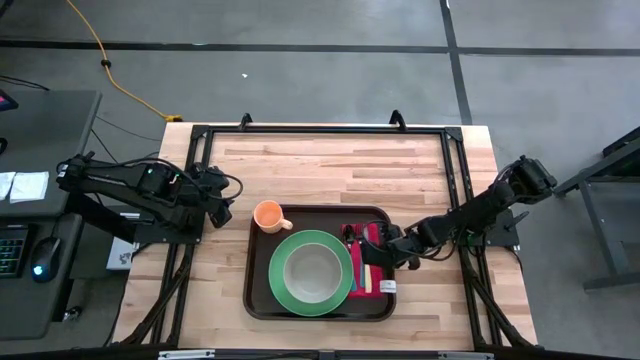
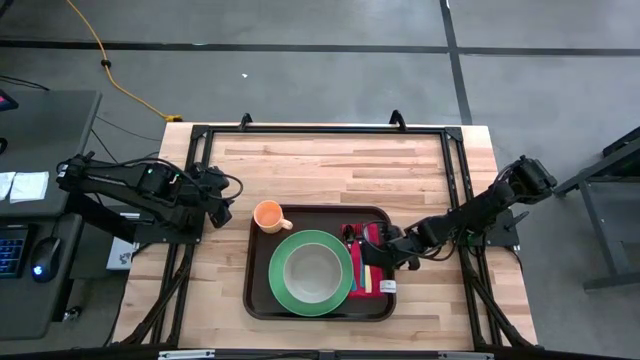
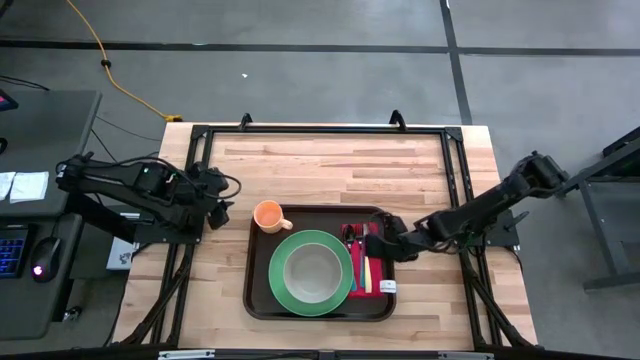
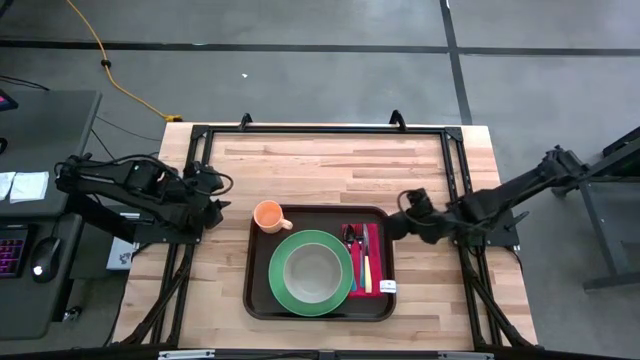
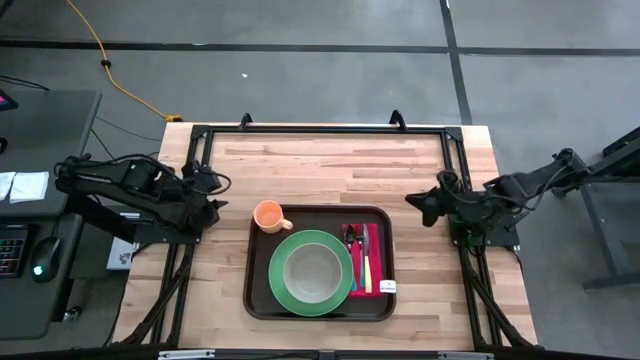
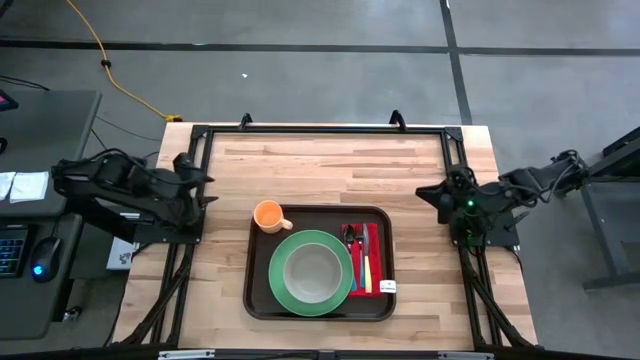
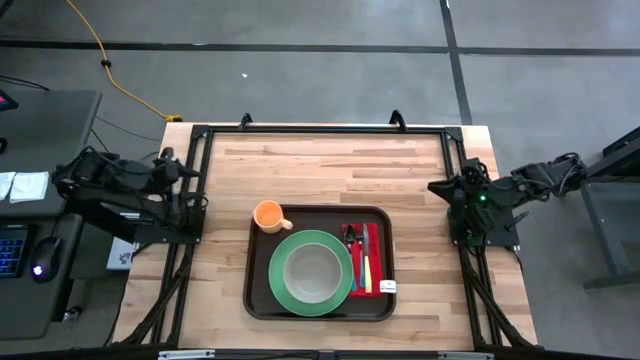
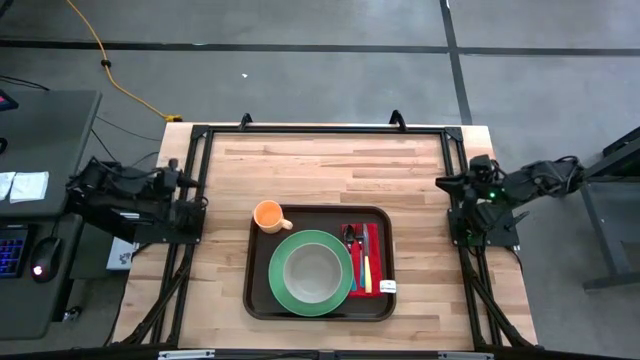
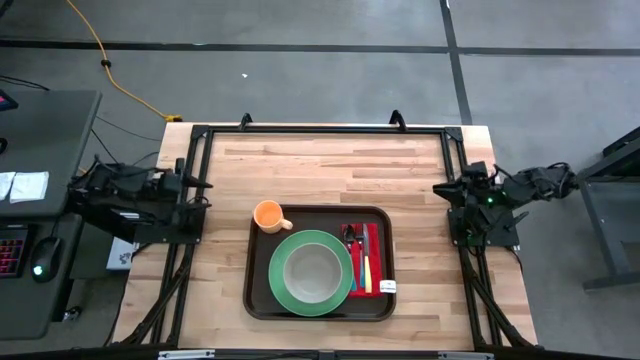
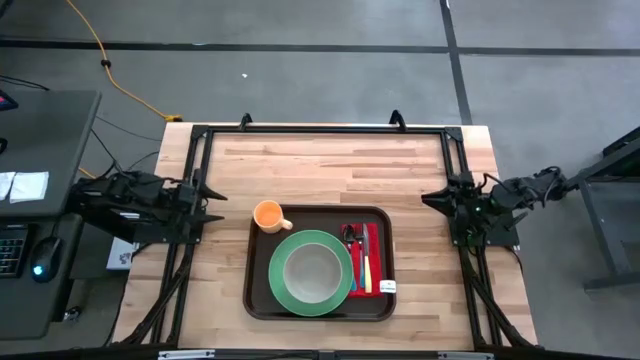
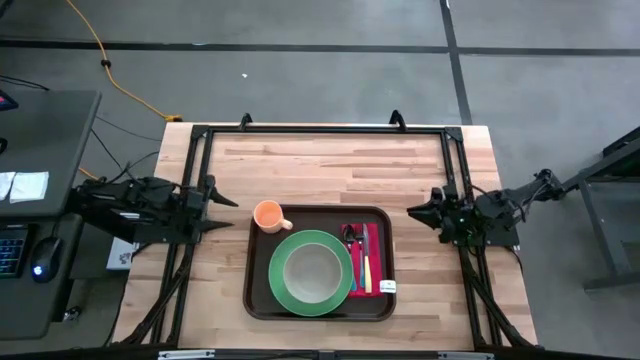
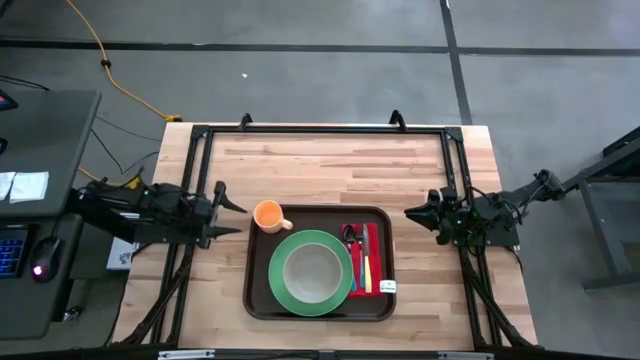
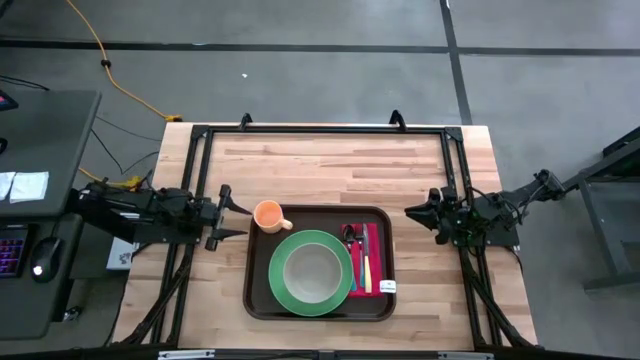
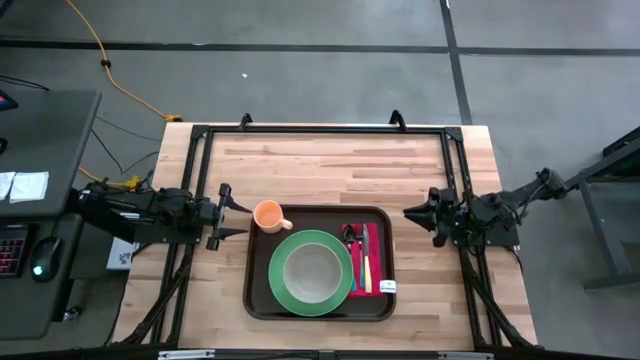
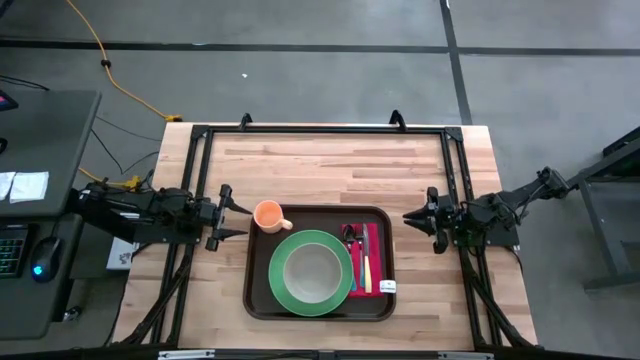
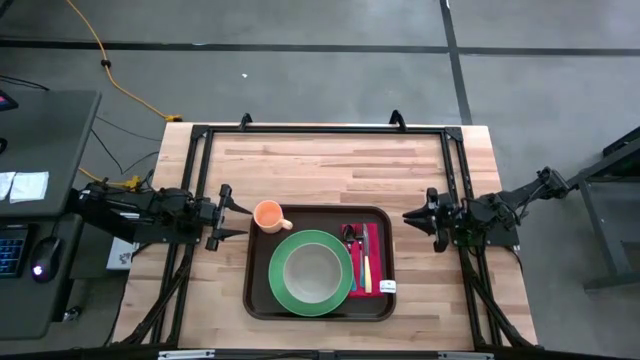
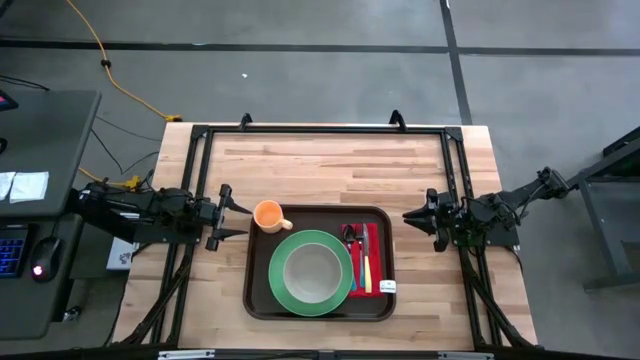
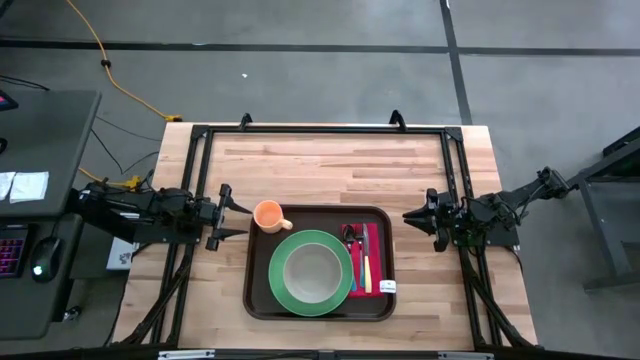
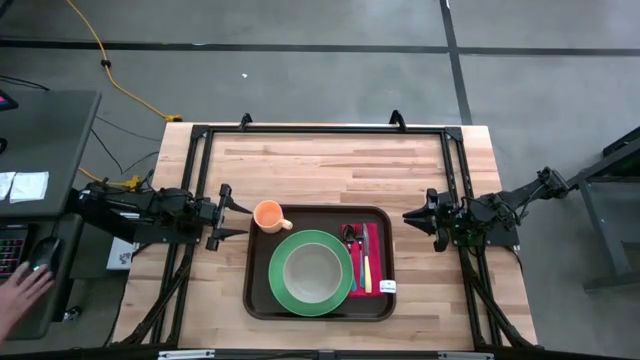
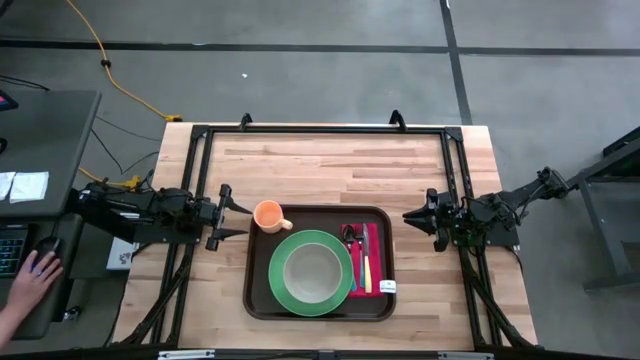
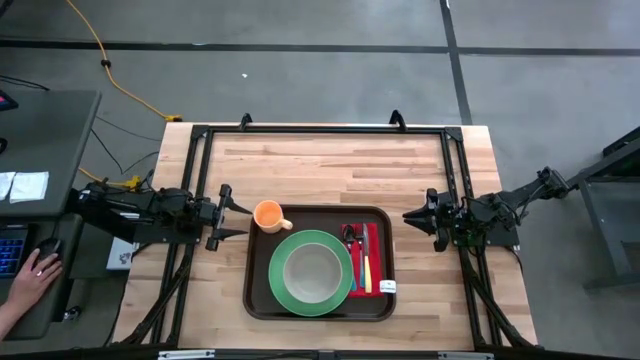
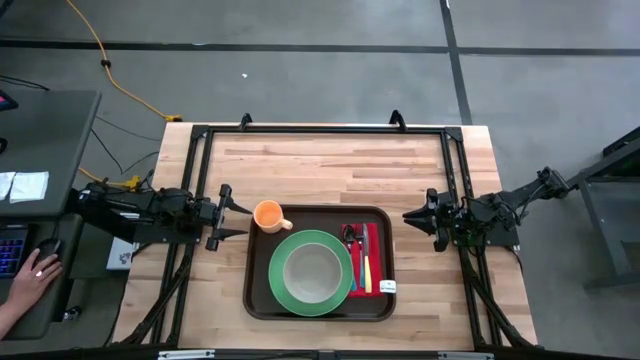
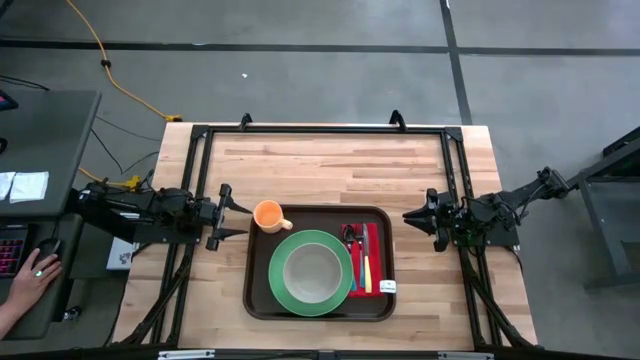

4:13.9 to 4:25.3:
Task: Set up tray
Return to Home Position

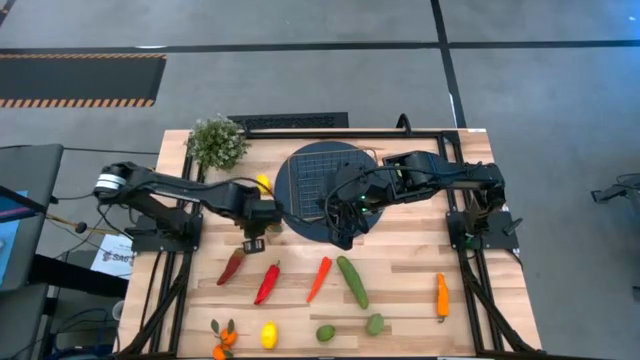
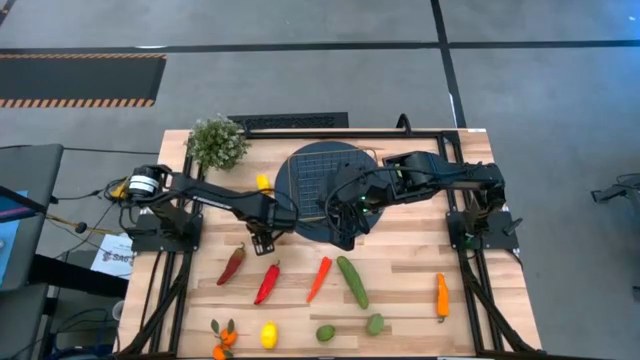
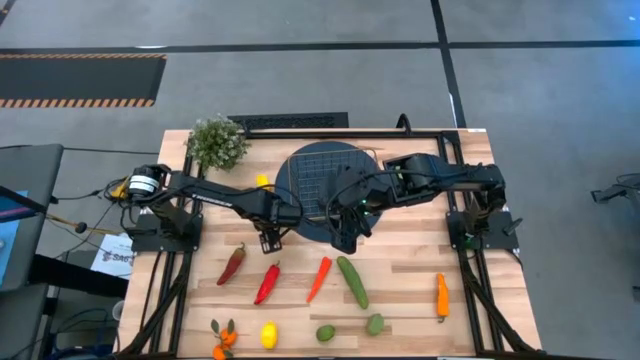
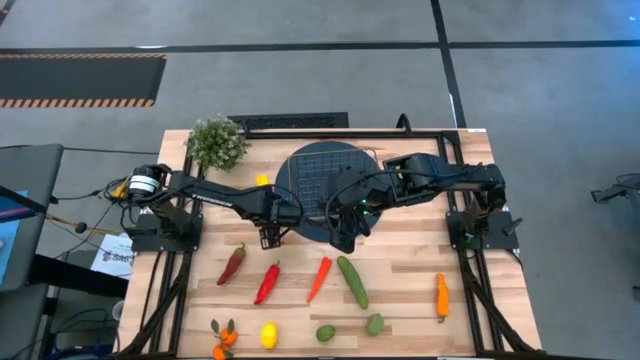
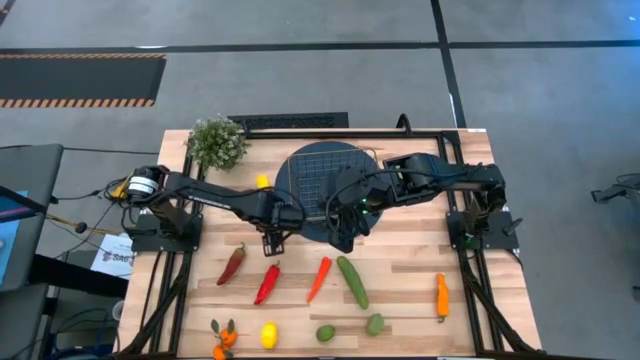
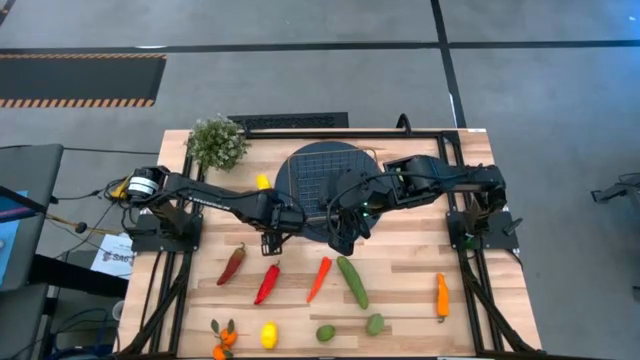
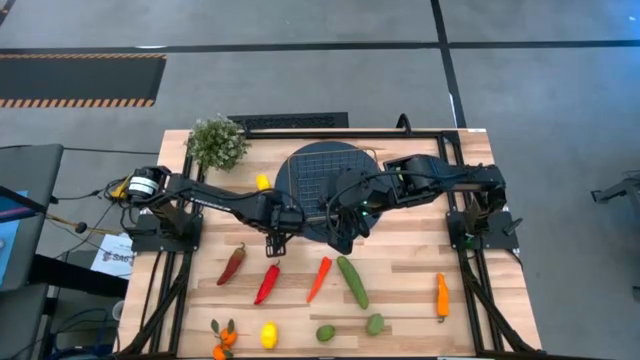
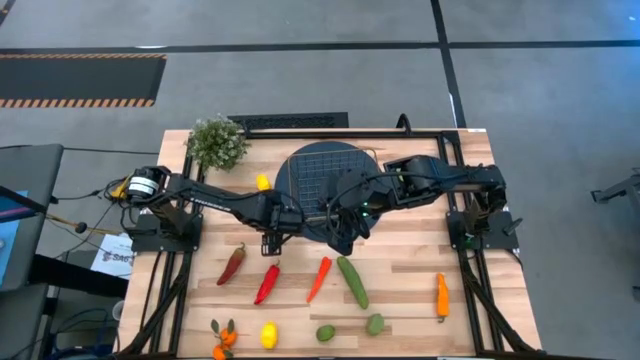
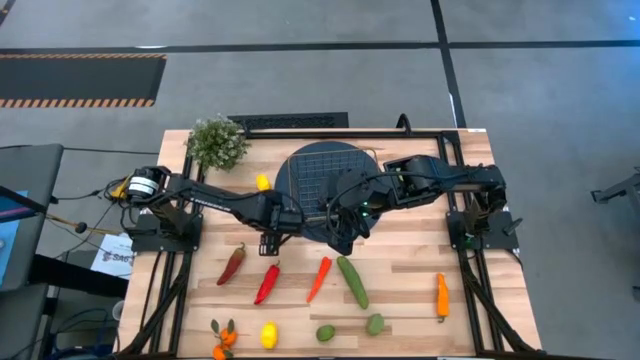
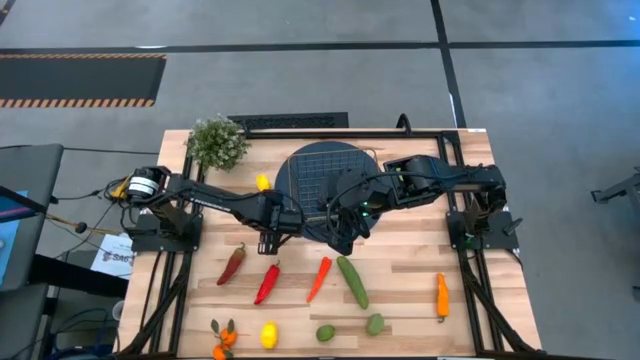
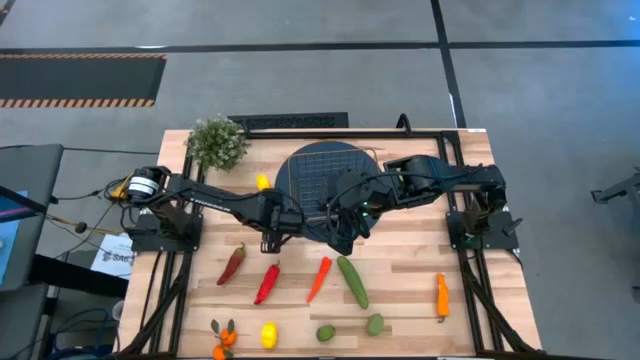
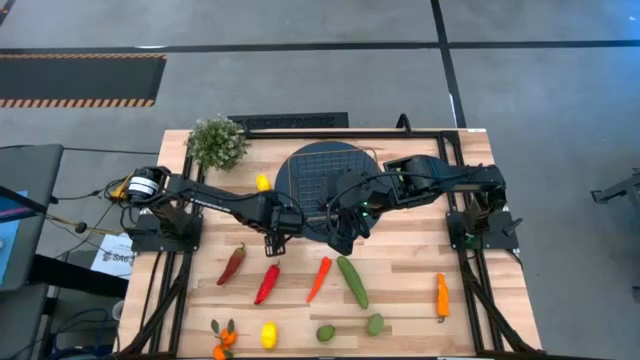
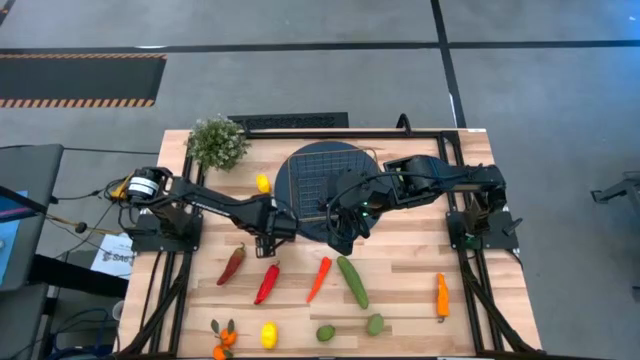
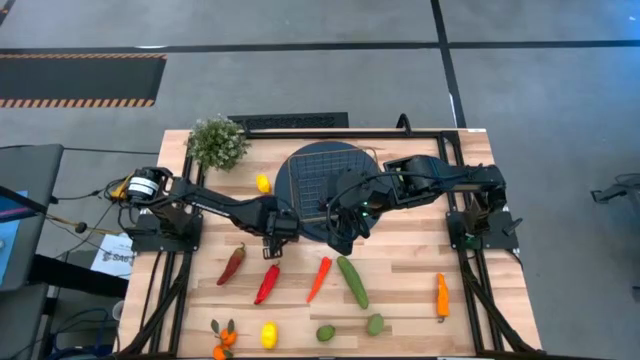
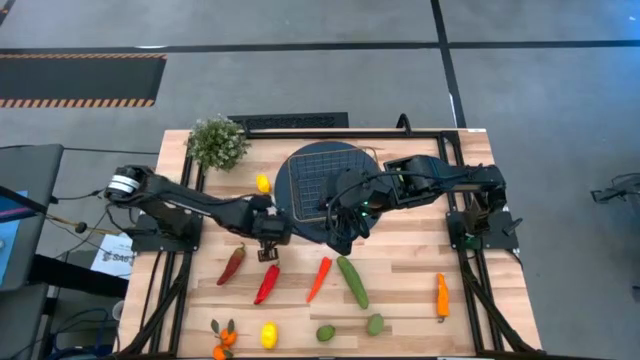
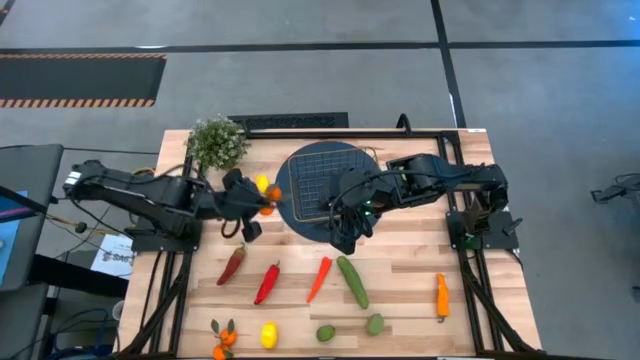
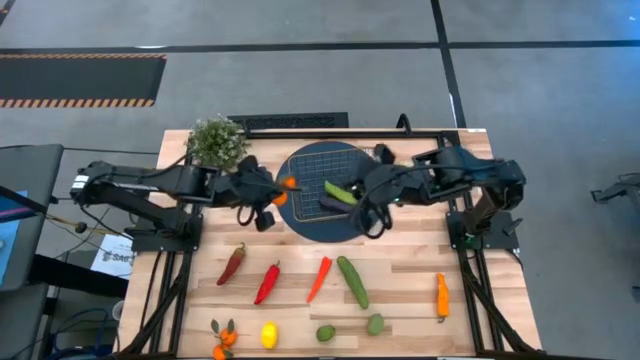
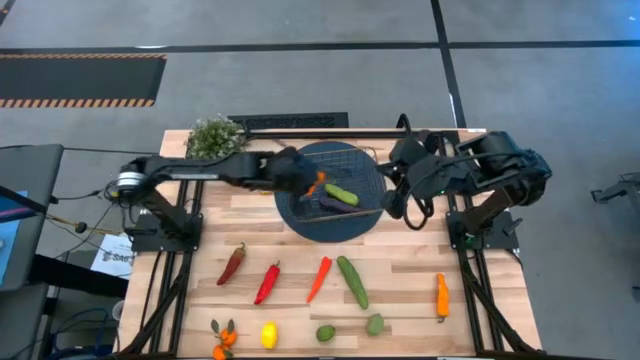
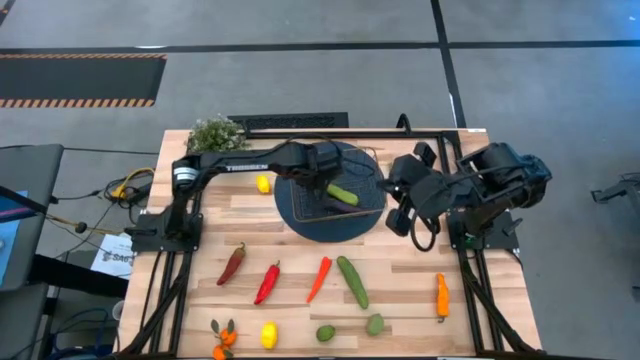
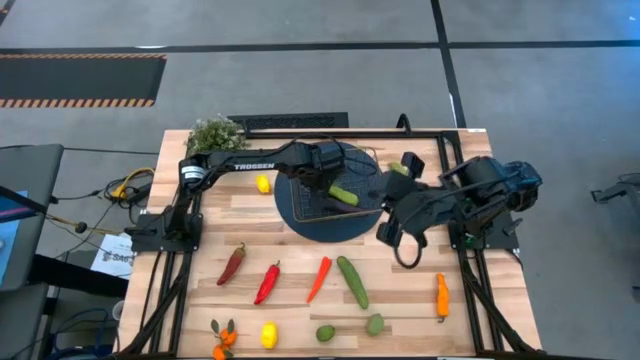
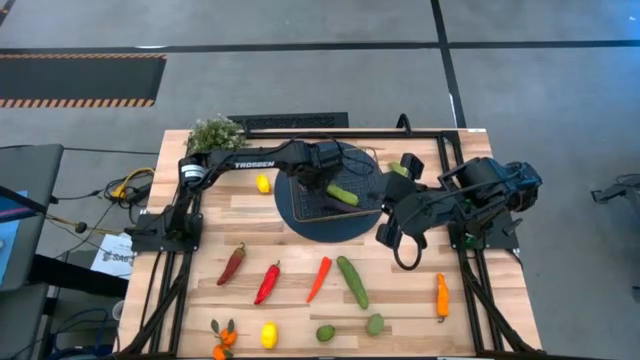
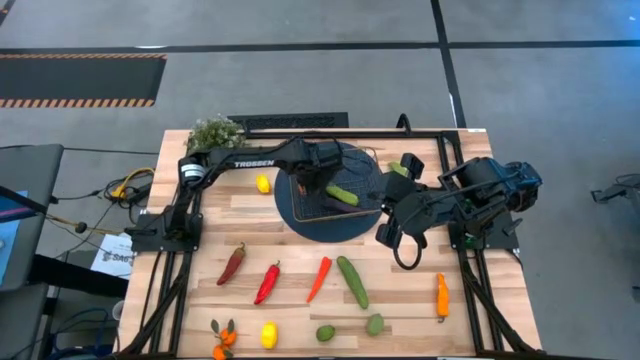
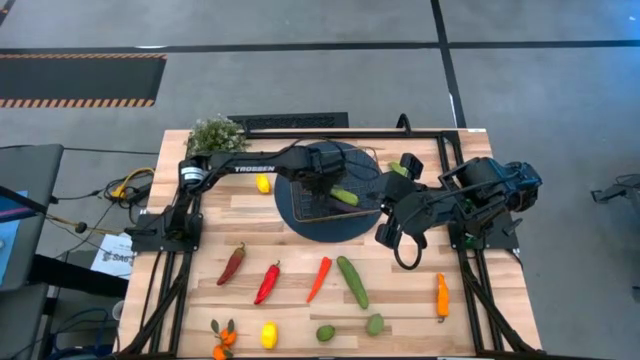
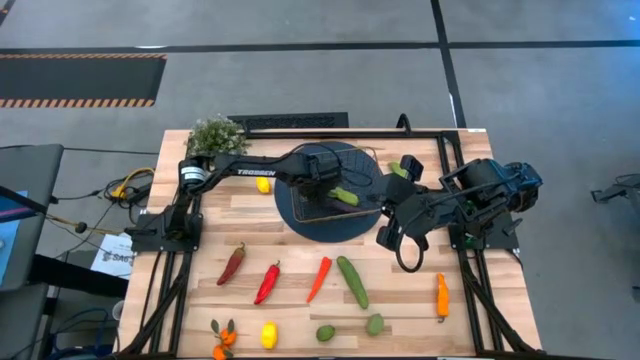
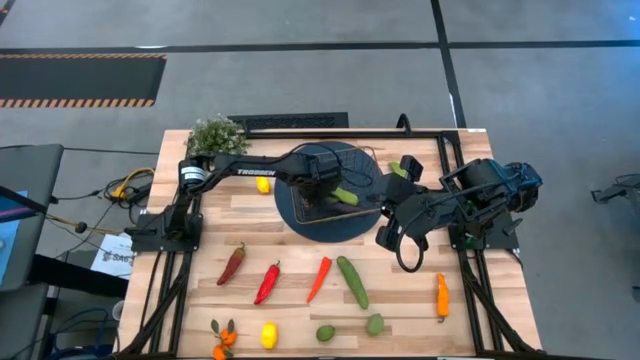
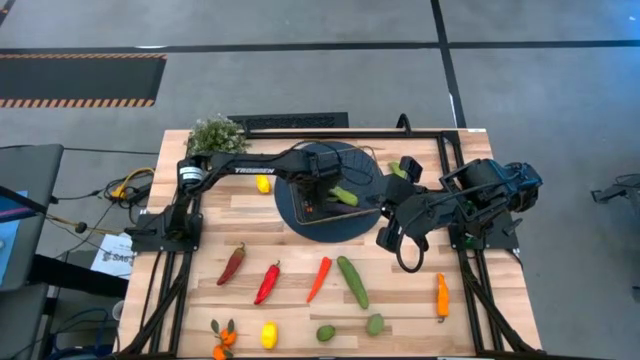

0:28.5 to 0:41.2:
Task: Build produce basket
Put the top oranges into the basket
